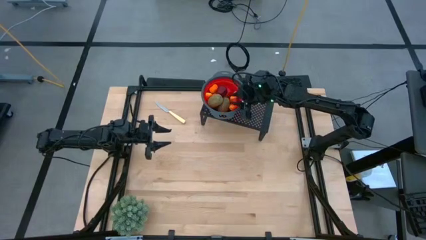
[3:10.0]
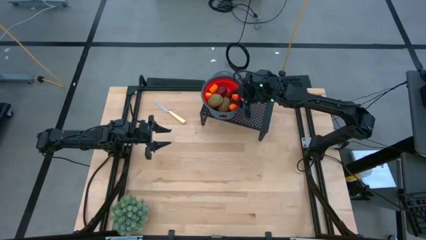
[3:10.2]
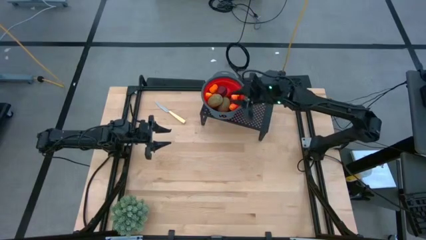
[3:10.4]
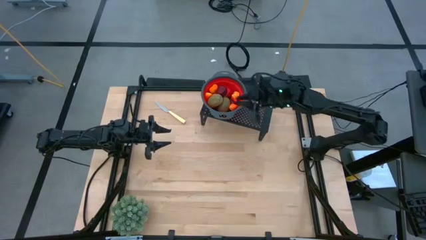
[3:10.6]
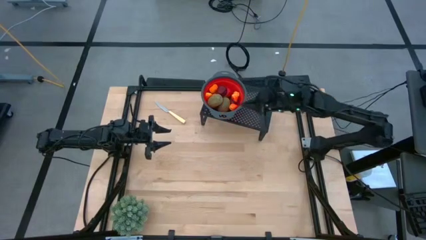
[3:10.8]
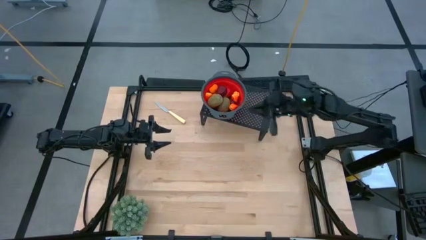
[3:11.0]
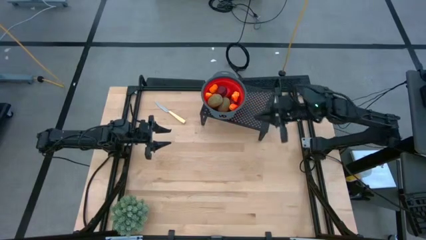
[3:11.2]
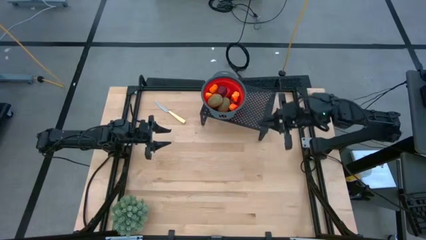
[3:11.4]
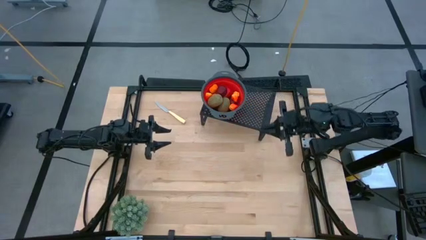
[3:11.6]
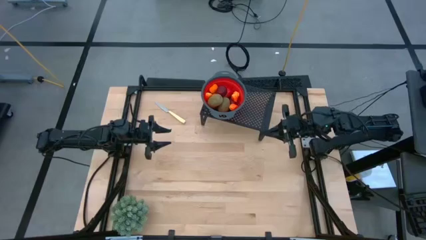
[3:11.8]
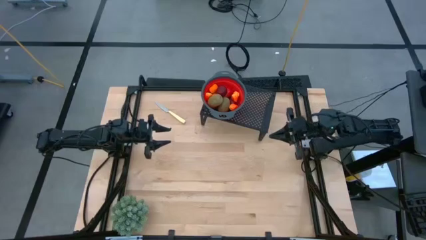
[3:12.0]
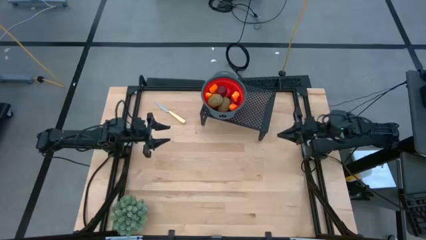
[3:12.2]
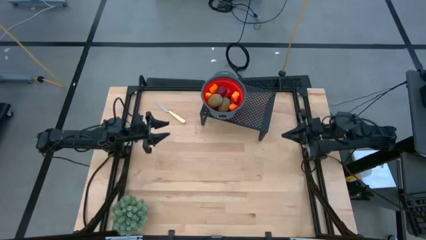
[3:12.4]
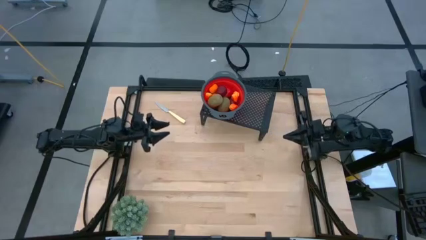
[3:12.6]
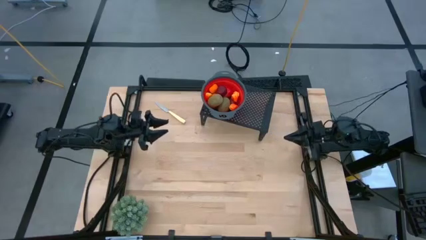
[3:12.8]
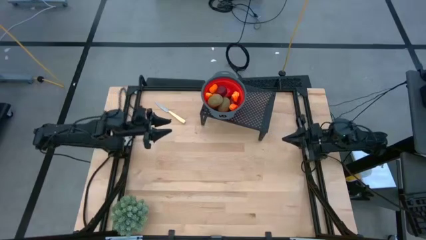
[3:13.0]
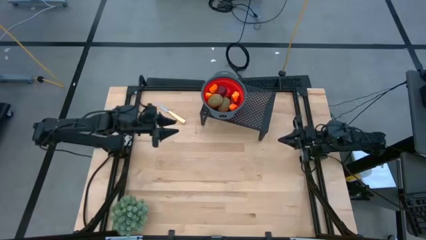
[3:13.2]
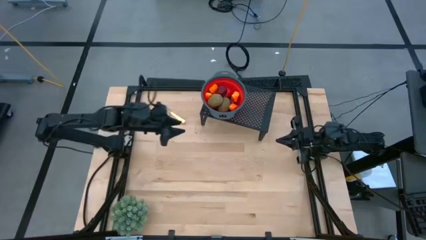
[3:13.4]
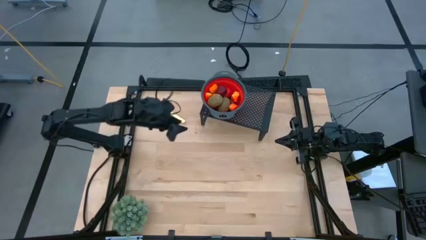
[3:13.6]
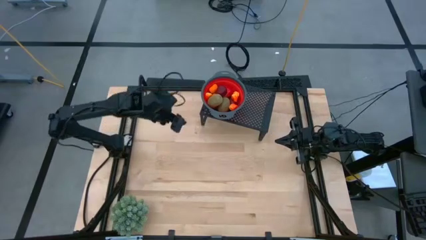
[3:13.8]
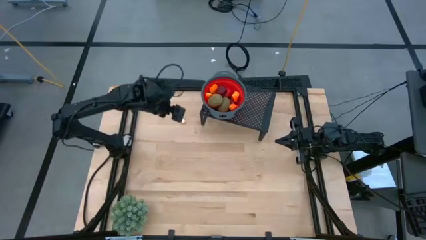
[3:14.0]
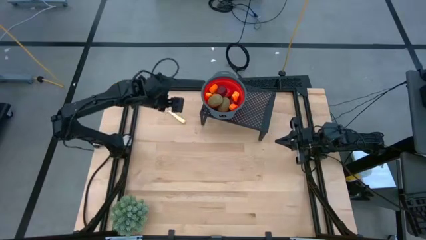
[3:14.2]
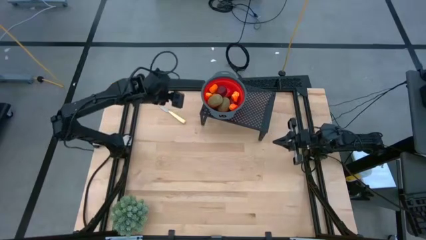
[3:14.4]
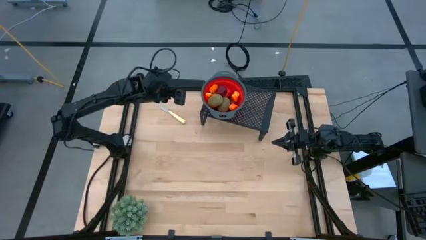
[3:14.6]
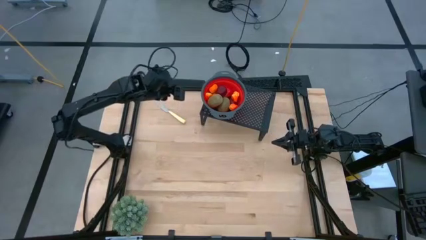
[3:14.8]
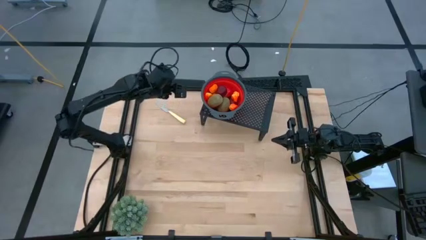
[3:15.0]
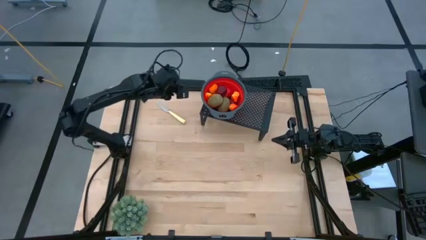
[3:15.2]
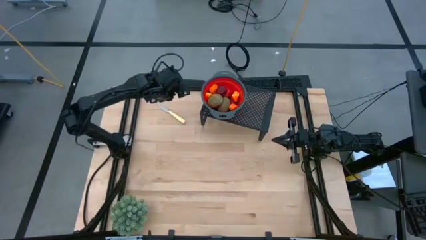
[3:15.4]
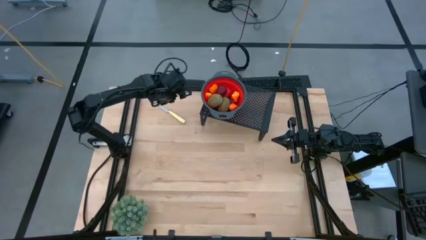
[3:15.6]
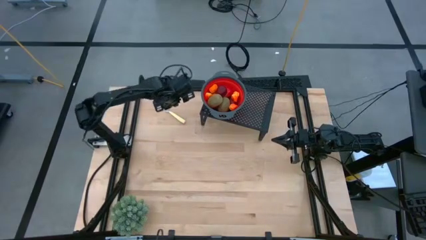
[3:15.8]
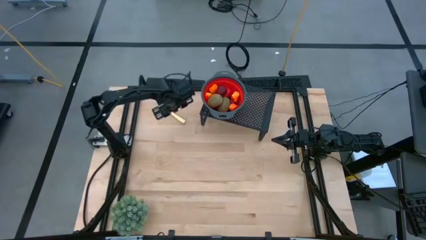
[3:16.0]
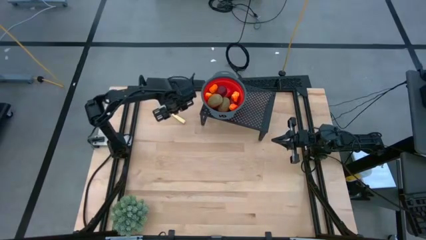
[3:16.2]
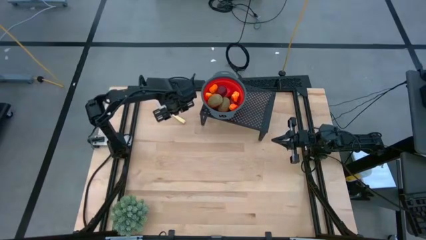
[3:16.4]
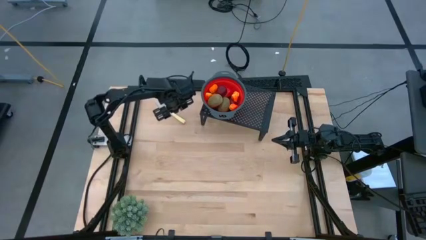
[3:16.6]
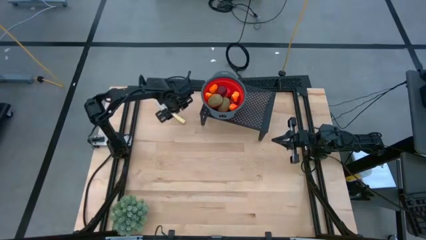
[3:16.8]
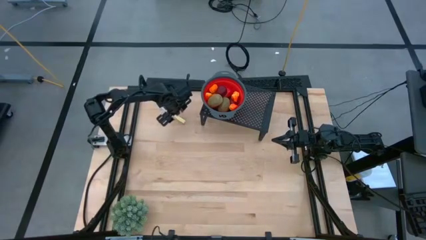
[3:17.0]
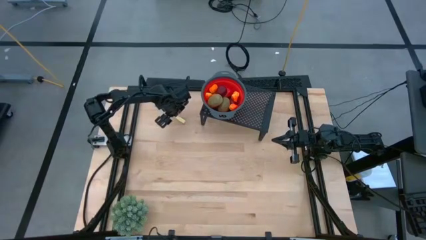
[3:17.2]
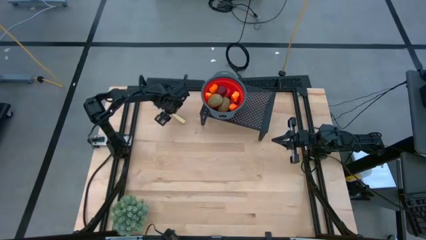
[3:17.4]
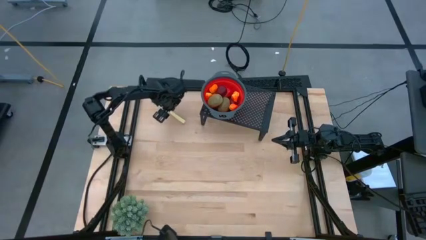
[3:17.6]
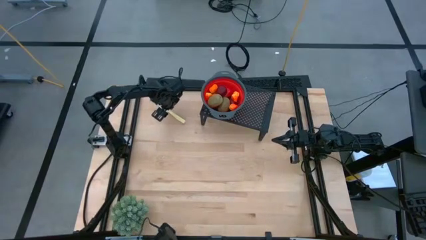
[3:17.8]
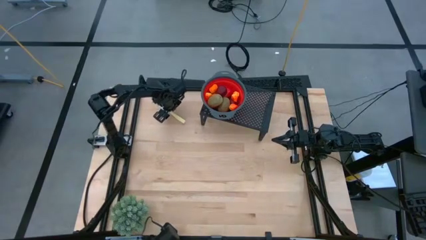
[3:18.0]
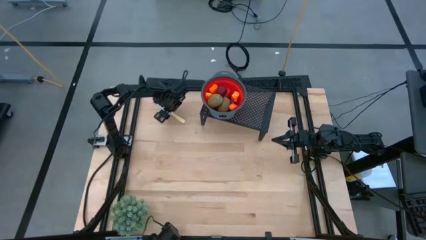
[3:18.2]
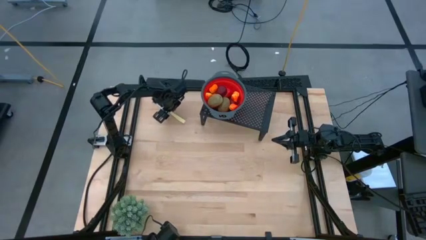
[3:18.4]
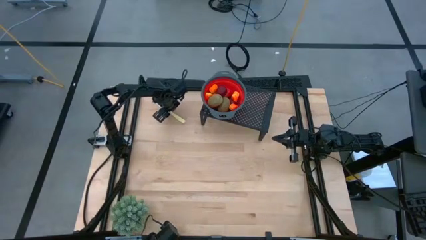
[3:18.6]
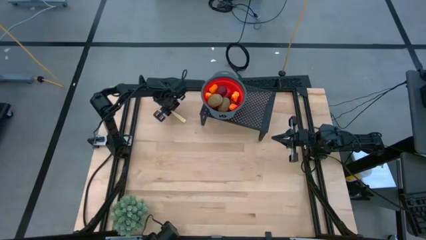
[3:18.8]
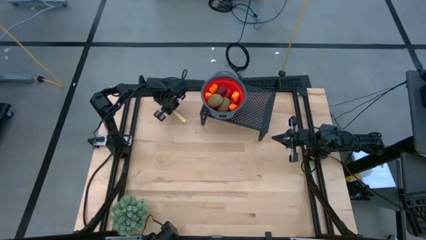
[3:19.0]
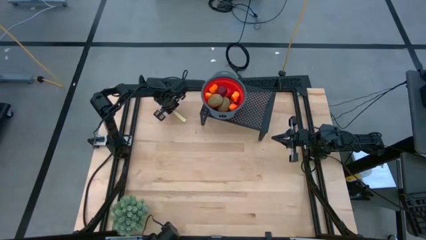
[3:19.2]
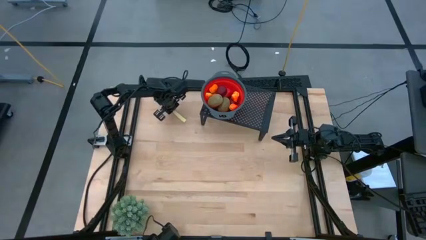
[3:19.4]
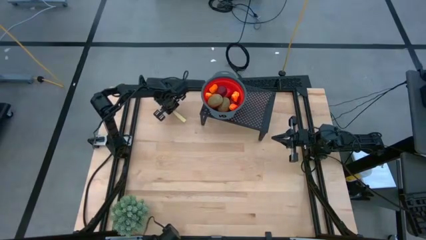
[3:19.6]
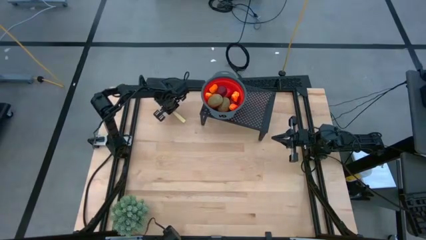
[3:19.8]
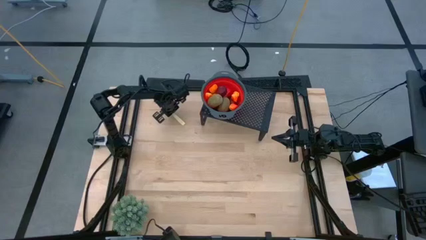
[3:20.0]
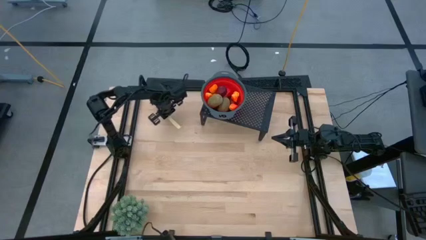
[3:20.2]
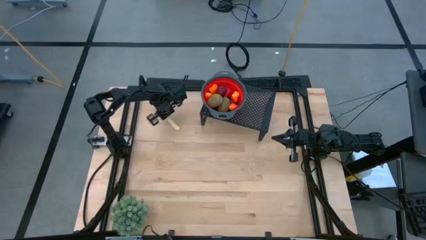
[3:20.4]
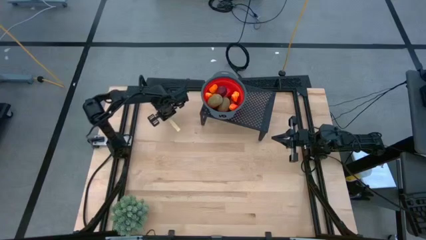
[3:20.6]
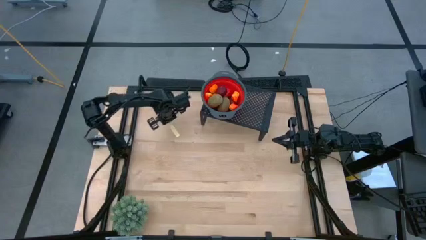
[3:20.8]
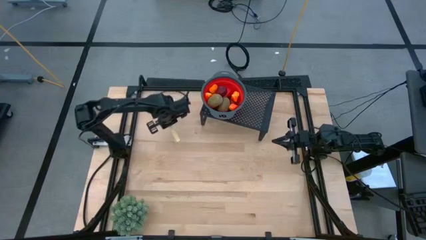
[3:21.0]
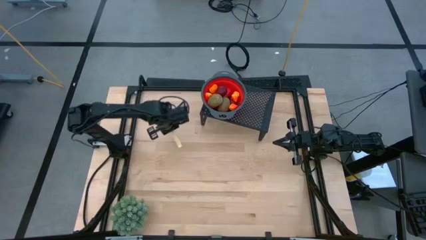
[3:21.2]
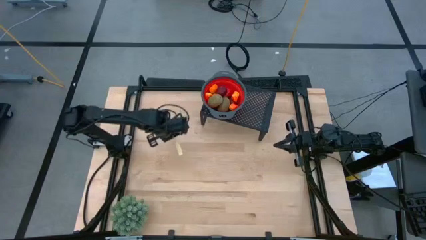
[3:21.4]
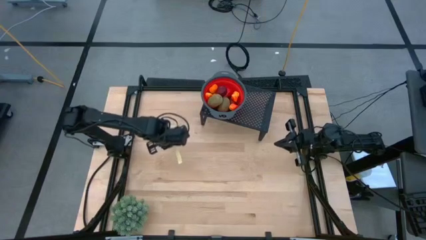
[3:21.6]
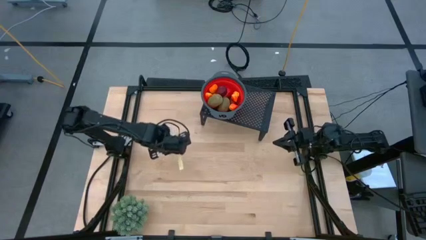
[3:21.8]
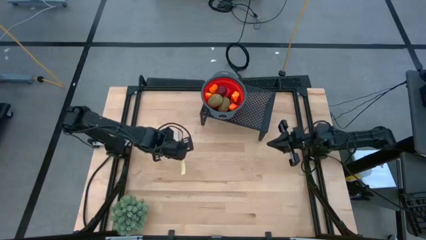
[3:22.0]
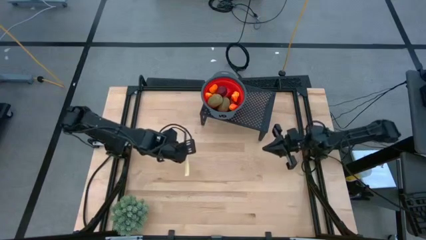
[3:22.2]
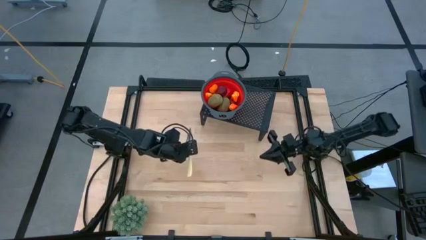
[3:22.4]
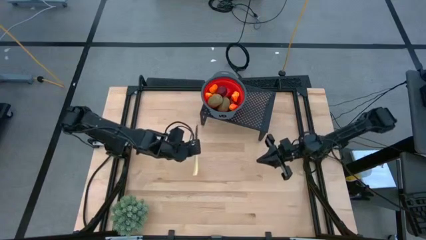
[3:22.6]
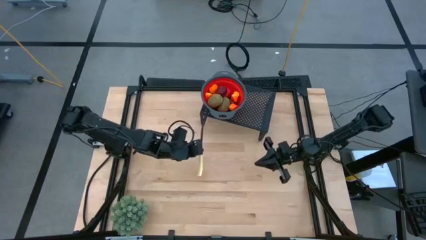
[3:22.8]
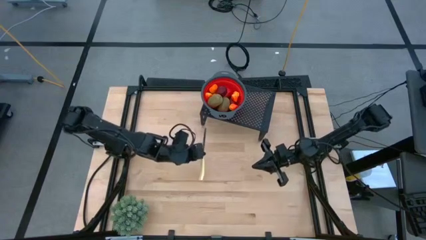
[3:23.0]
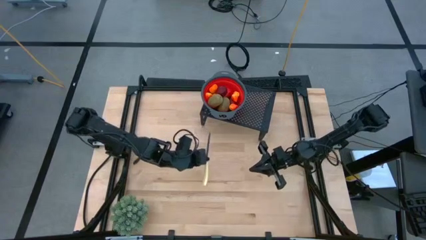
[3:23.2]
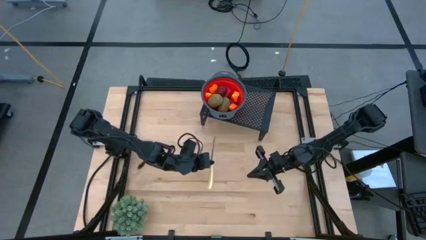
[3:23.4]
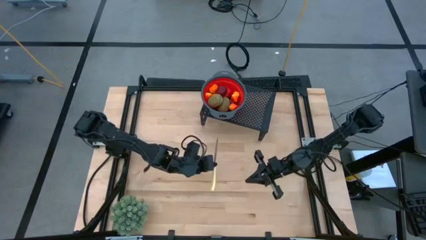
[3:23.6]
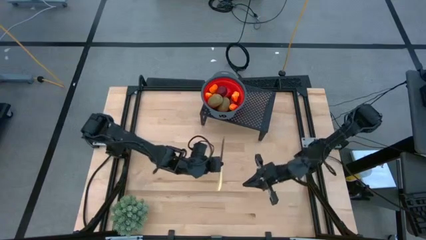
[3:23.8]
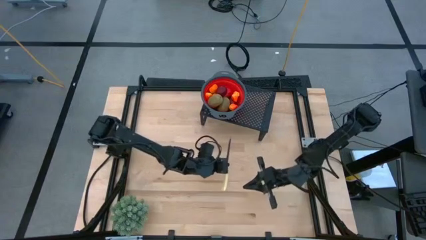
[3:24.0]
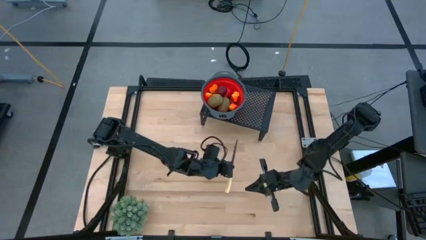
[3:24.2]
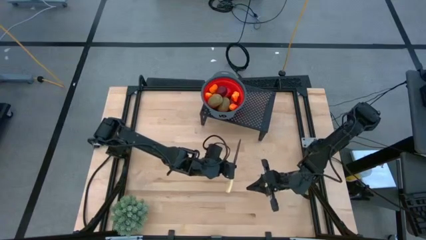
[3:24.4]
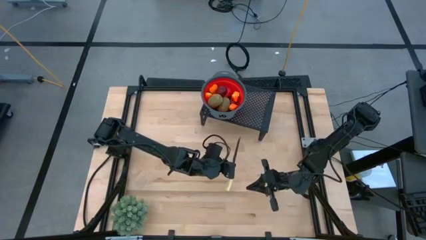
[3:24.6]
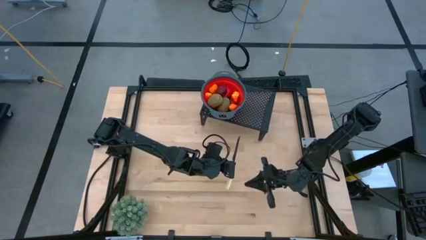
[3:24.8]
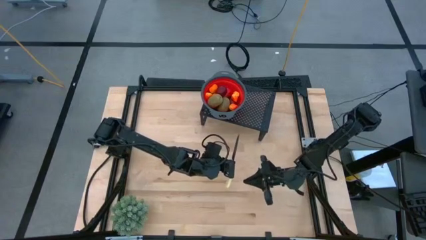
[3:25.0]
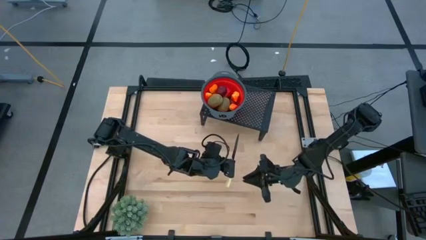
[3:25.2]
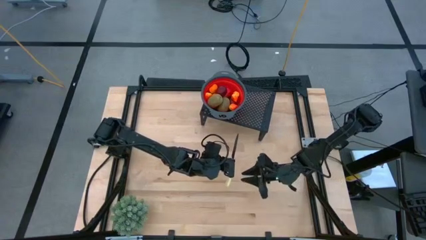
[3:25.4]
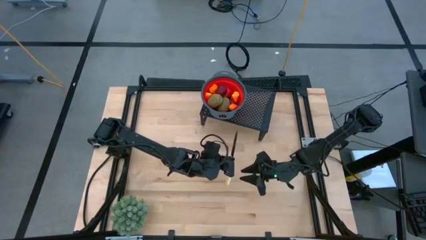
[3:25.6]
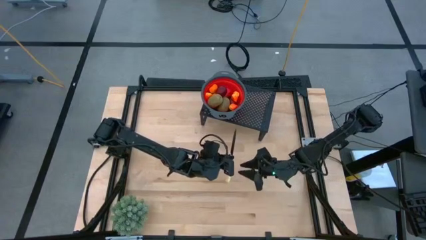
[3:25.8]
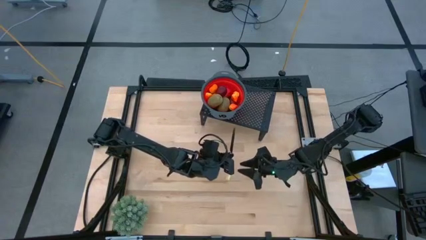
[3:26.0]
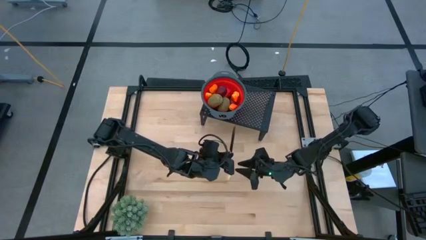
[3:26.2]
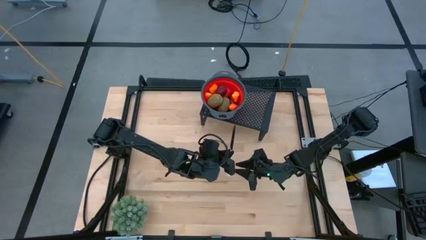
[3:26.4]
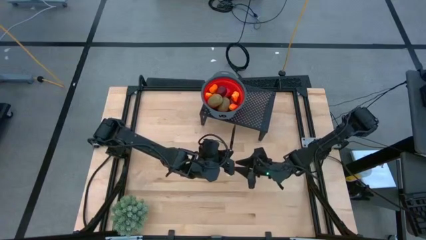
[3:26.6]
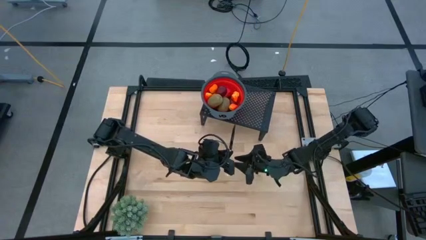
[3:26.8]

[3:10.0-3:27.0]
Task: Pick & Place Fruit
Put the knife on the shelf to the right of the strainer bowl
